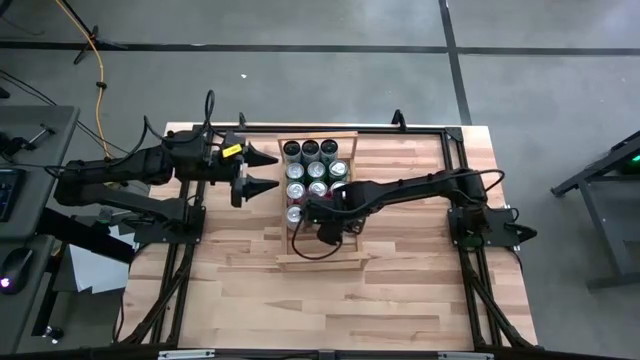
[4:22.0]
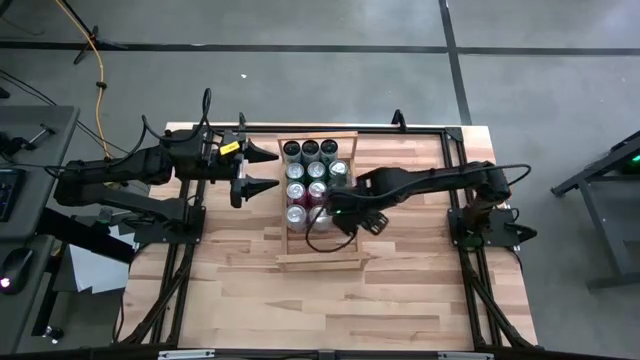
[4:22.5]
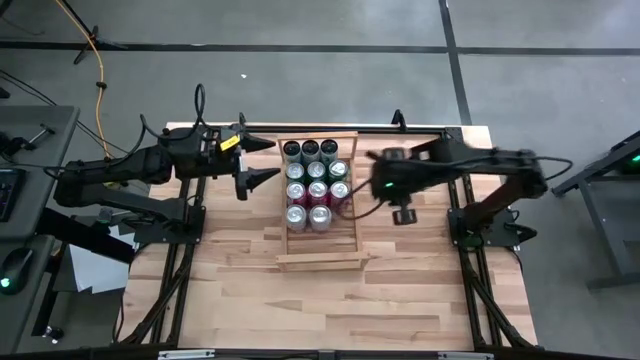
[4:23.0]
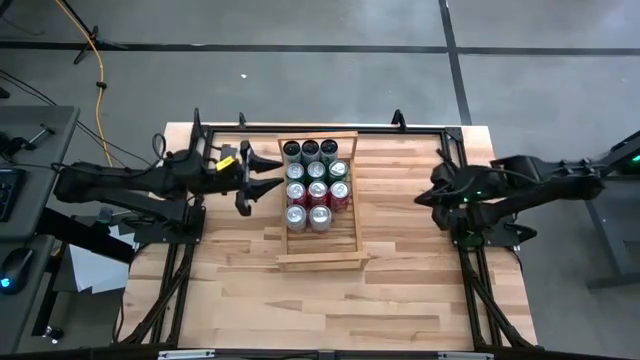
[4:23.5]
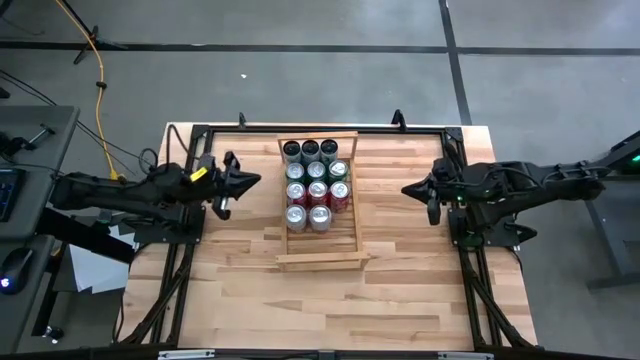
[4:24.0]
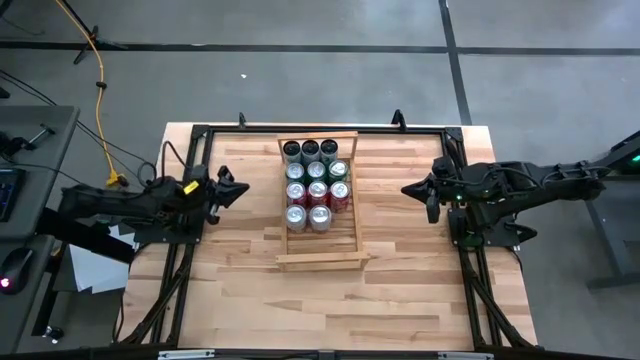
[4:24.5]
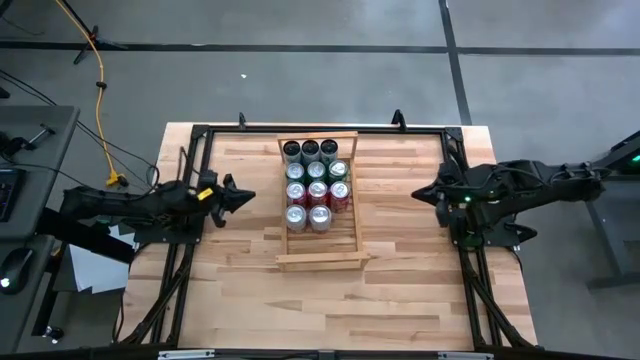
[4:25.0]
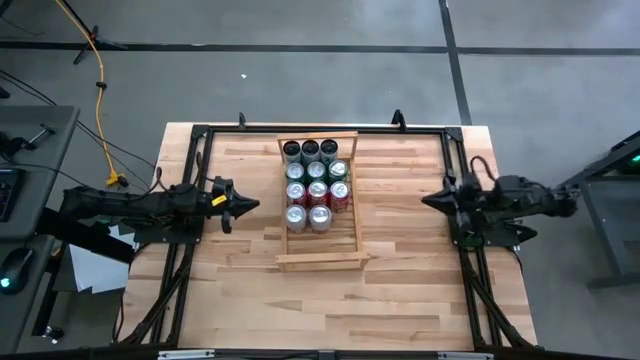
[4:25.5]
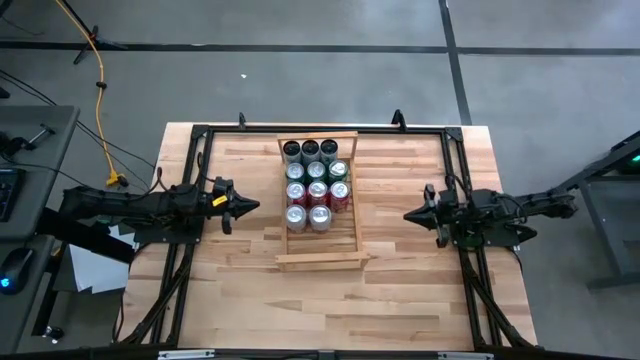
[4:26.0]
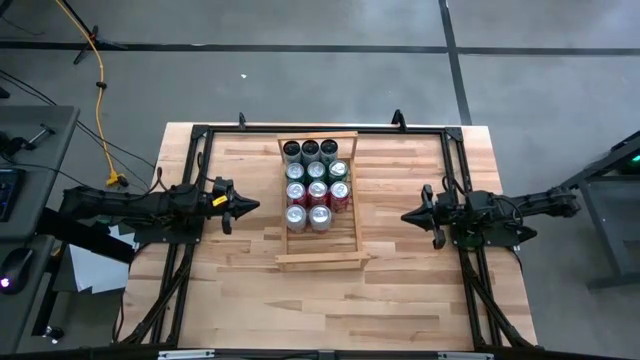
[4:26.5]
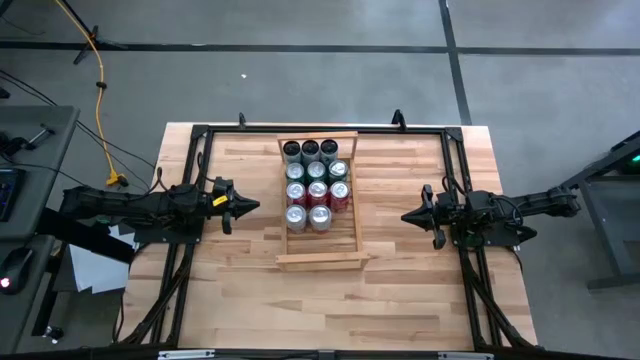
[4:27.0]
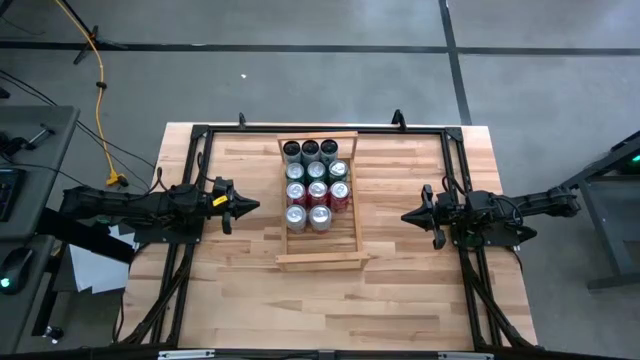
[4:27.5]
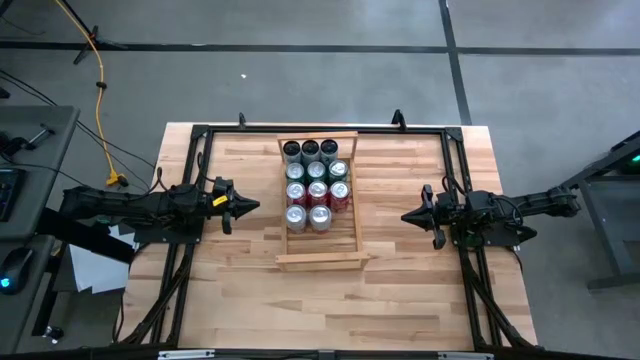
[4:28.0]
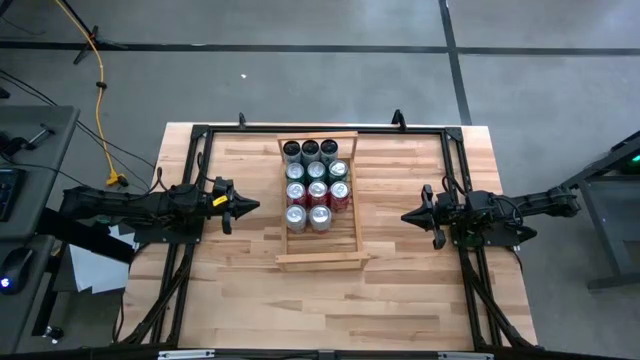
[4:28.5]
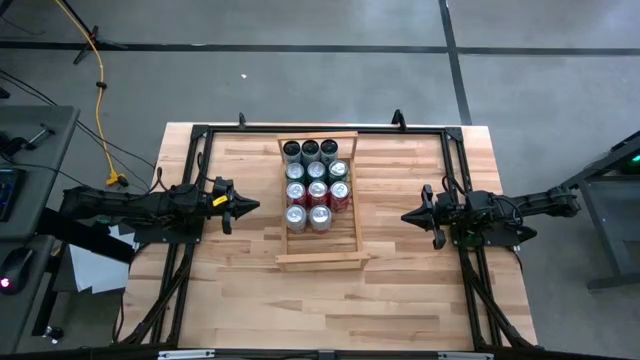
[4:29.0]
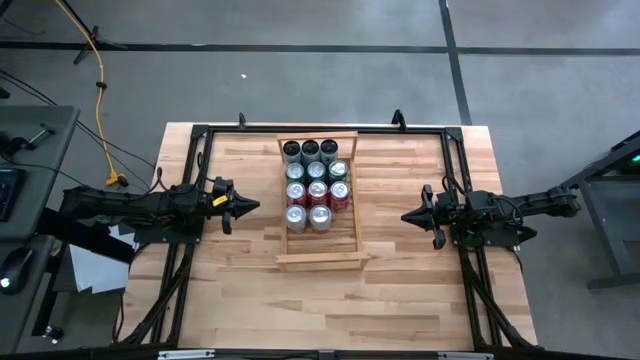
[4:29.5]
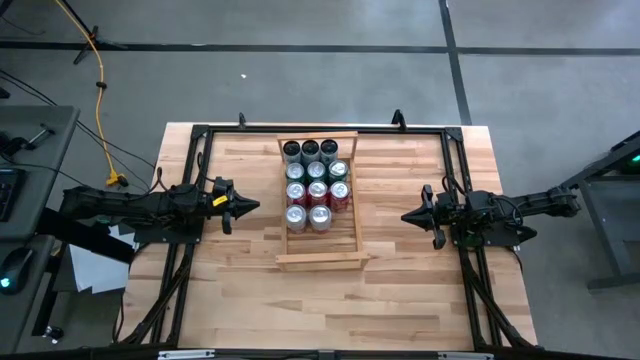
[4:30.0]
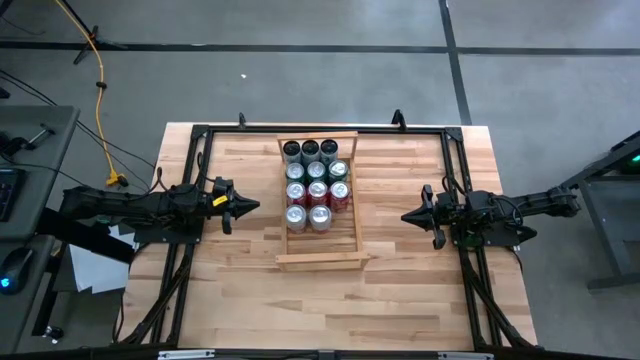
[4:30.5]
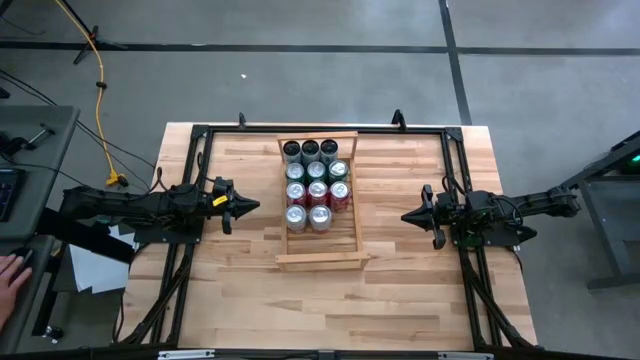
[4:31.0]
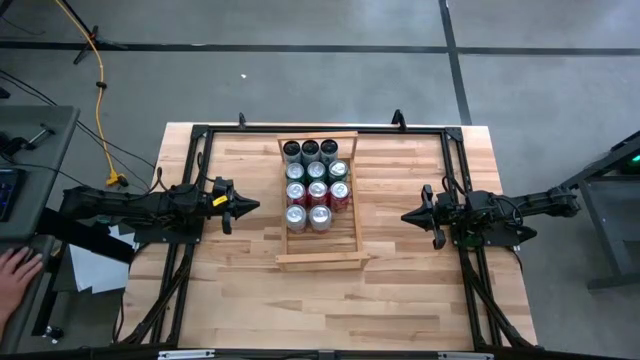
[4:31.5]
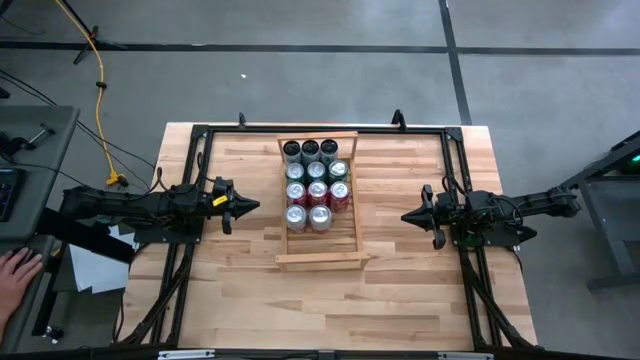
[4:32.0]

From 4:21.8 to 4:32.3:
Task: Place canned beverage on shelf
Return to Home Position

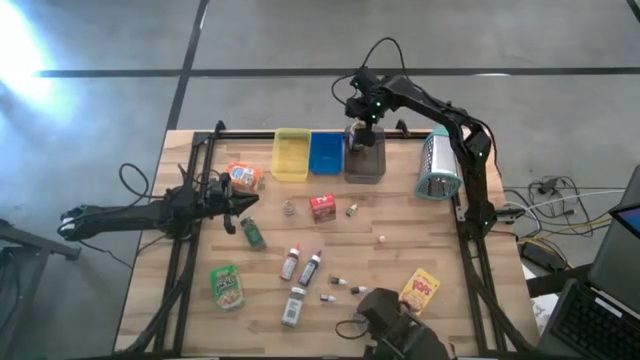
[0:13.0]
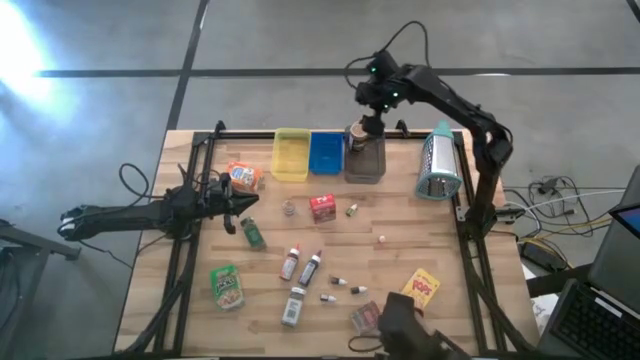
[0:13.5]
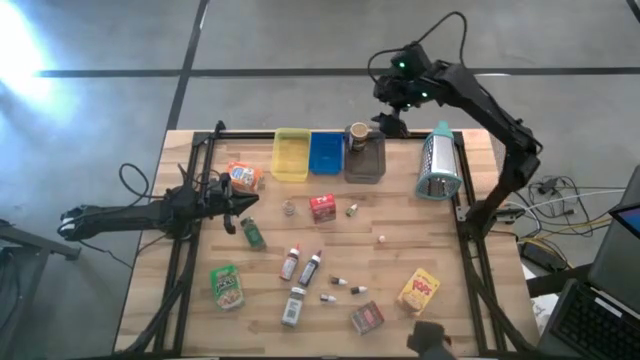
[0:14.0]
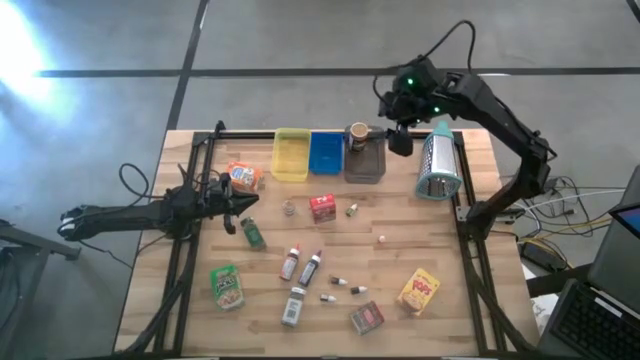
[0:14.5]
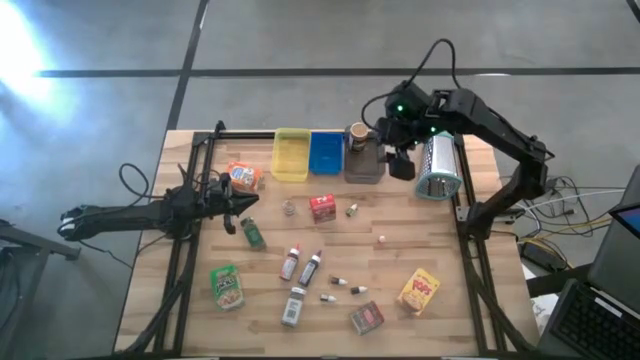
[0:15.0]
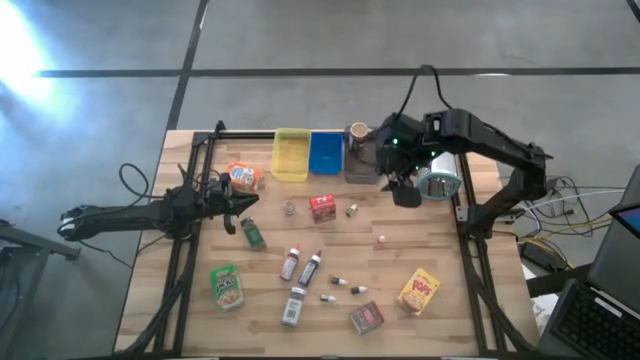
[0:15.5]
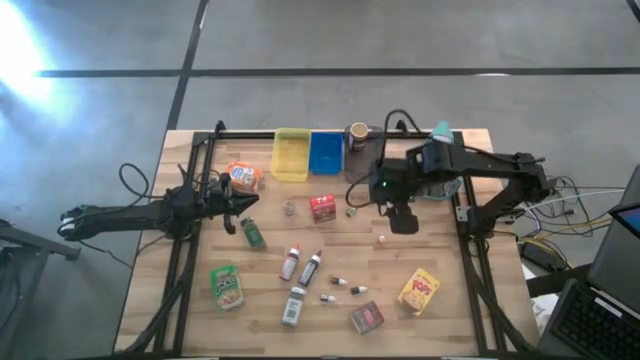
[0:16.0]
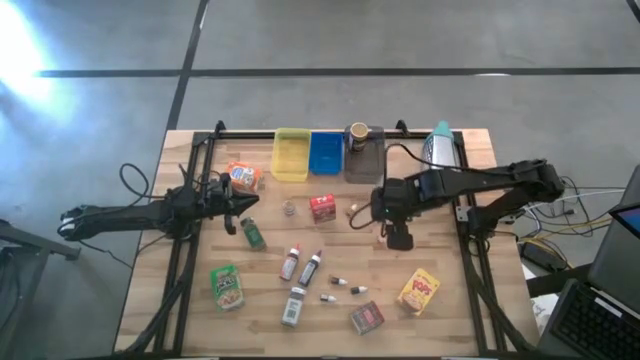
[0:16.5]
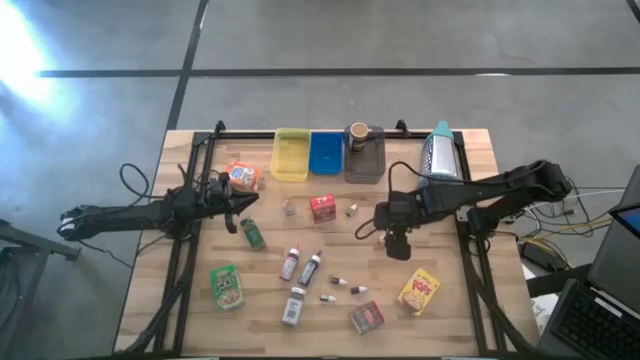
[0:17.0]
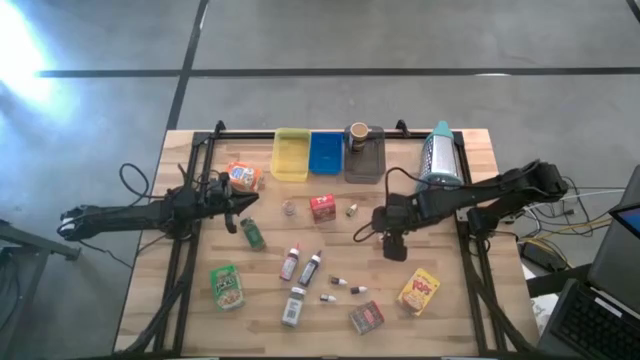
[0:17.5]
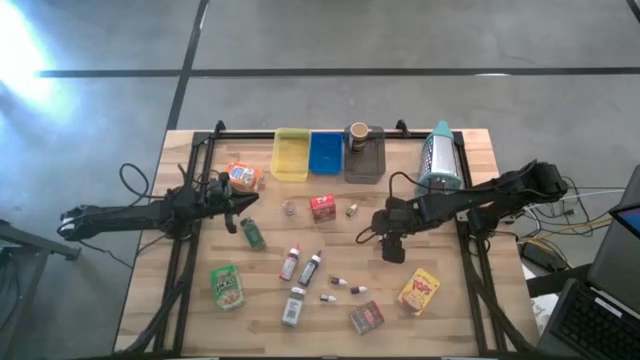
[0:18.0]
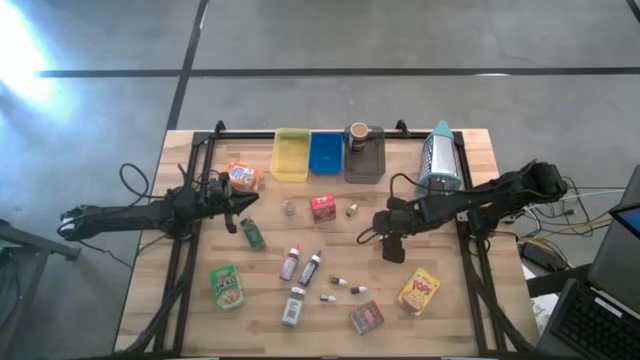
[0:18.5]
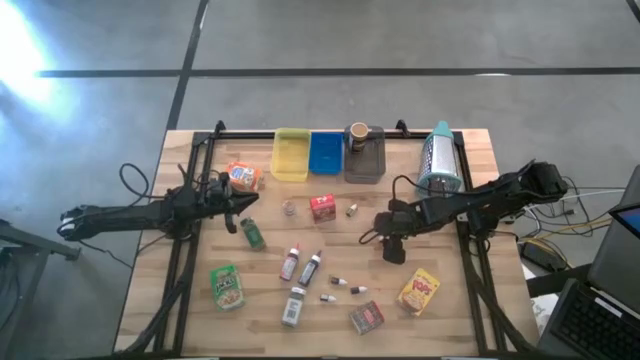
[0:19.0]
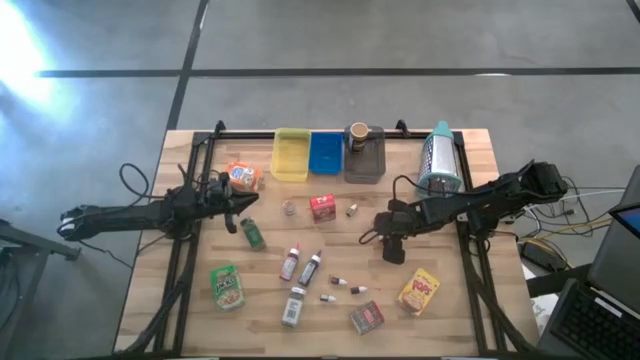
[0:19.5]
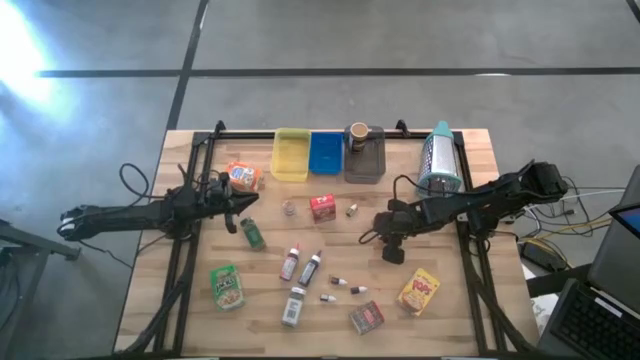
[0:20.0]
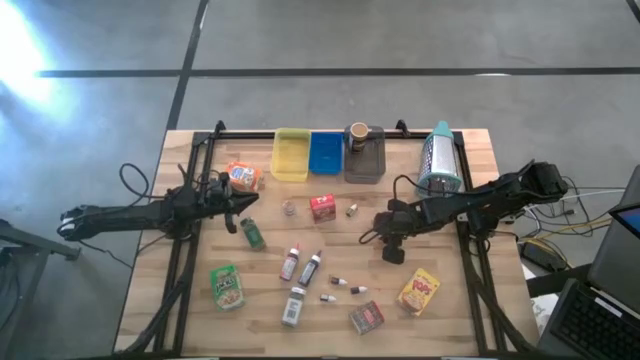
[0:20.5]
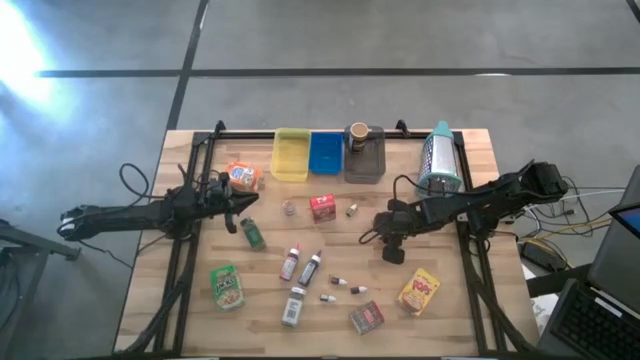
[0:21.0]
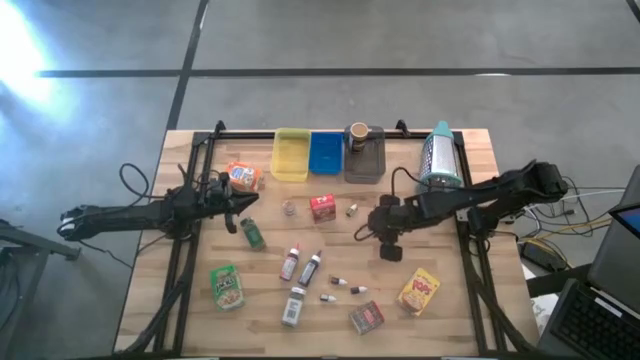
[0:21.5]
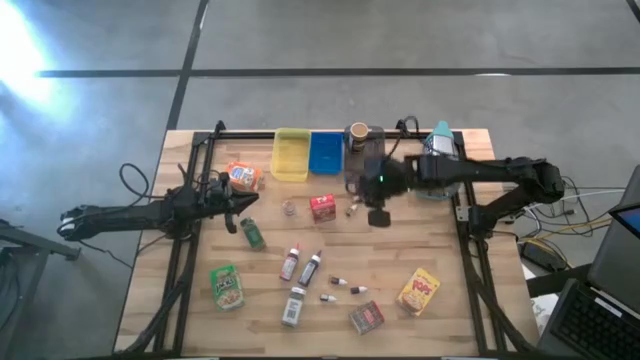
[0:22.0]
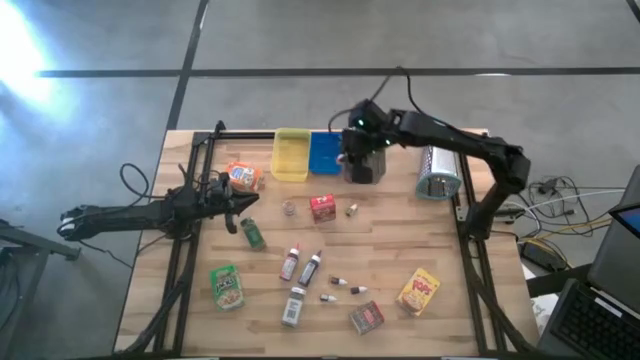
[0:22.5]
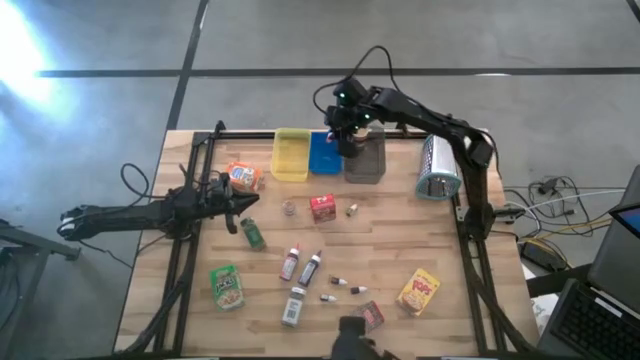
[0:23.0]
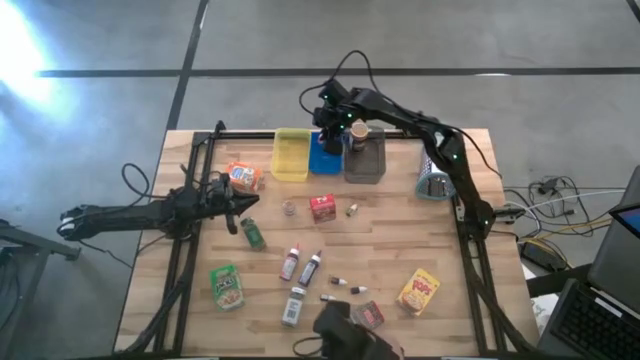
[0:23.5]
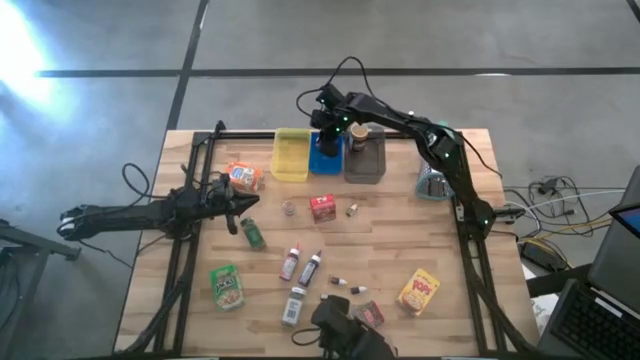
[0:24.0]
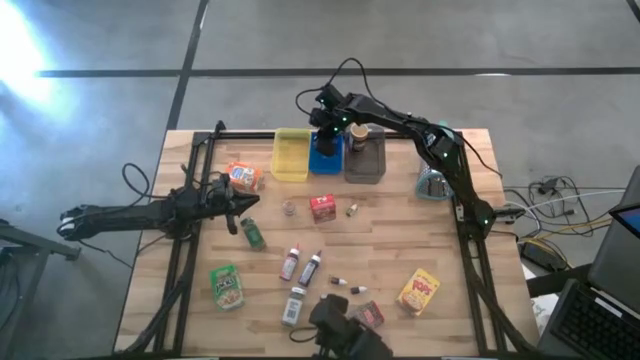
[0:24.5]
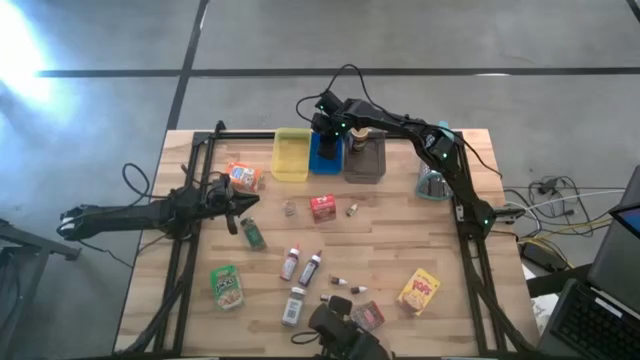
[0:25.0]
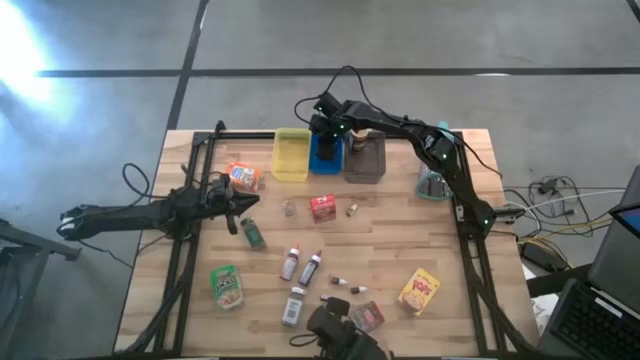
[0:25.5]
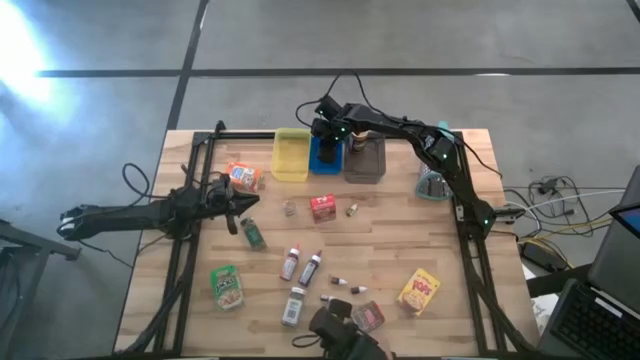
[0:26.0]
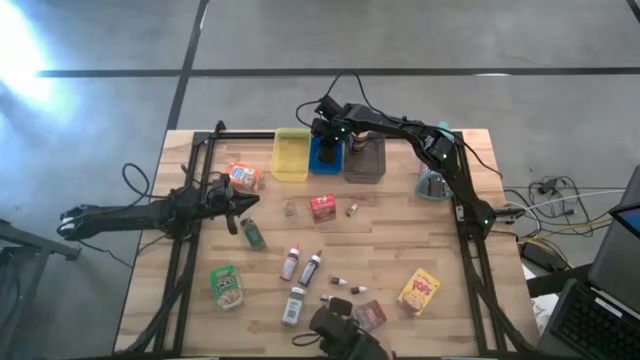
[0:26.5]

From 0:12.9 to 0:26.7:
Task: Pick & Place Kitchen Items
Put the small orange food coloring bottle into the blue bin
